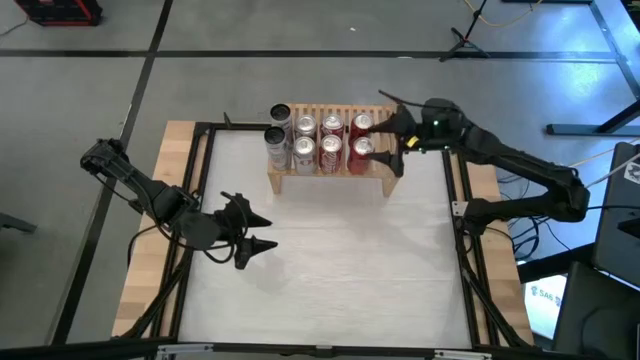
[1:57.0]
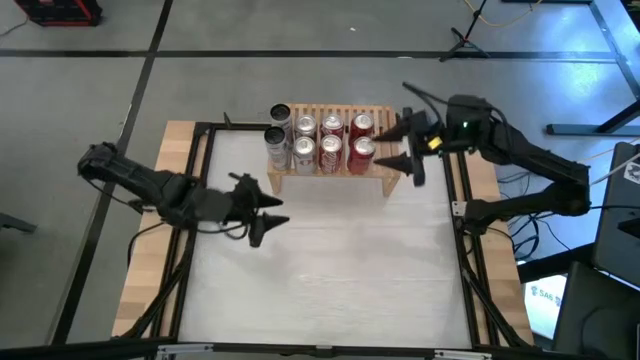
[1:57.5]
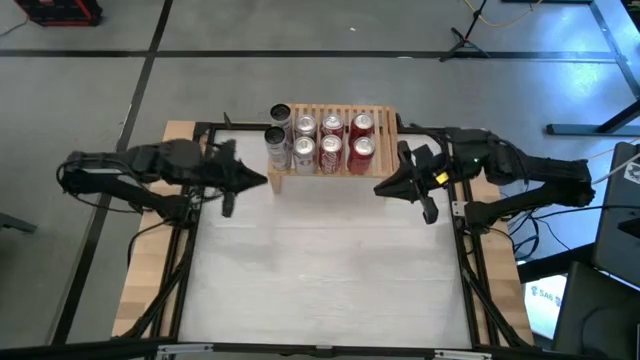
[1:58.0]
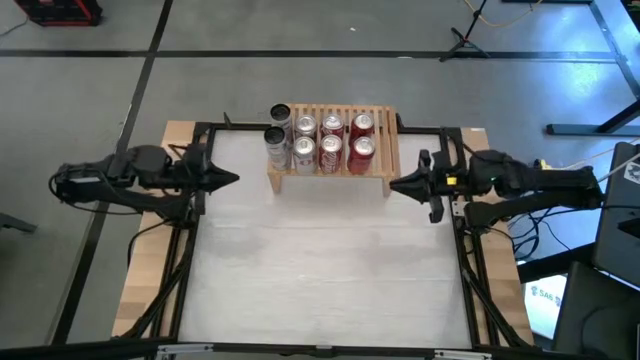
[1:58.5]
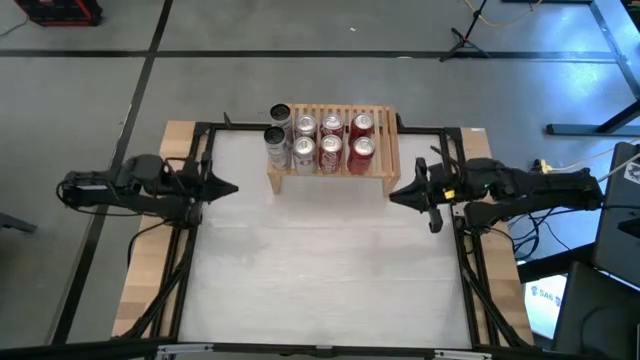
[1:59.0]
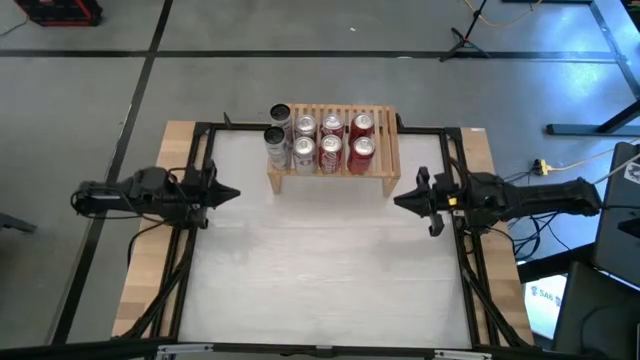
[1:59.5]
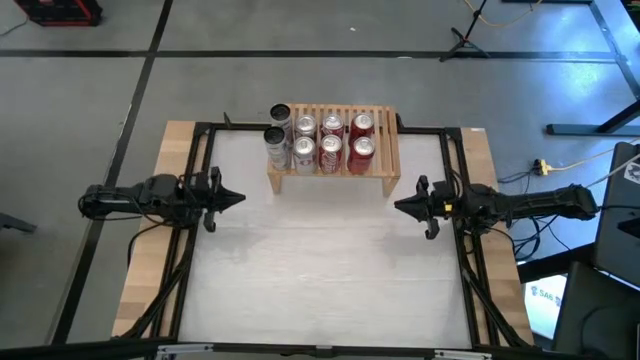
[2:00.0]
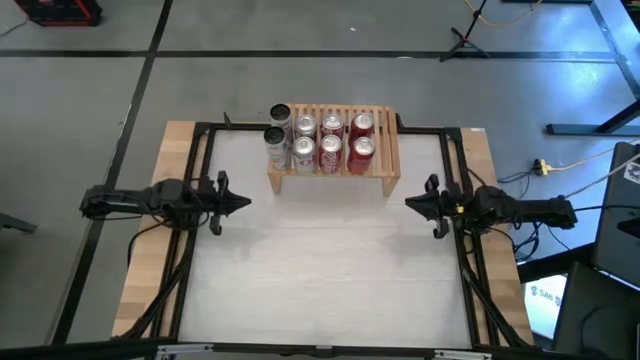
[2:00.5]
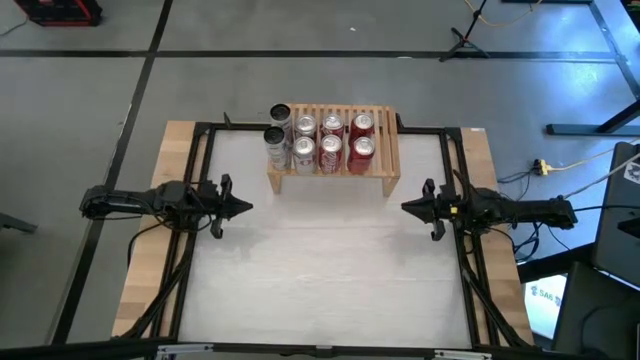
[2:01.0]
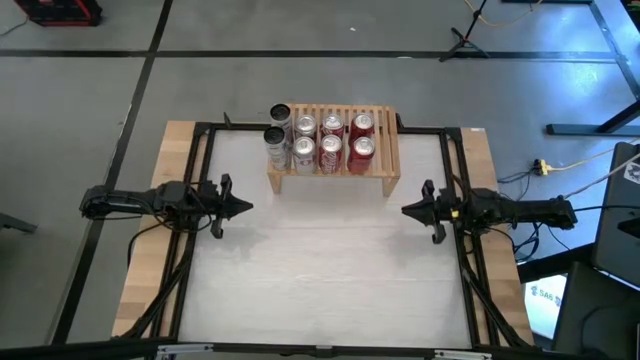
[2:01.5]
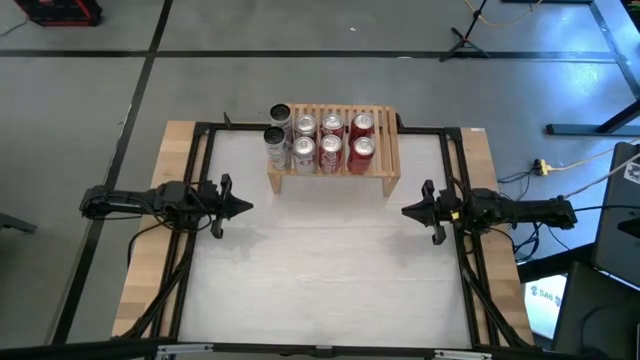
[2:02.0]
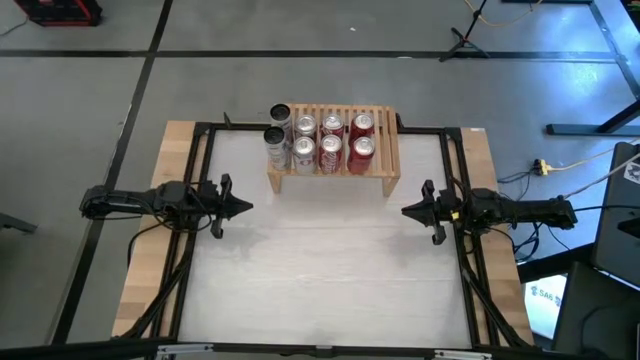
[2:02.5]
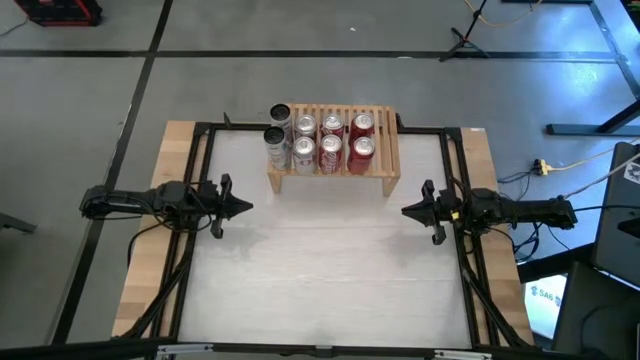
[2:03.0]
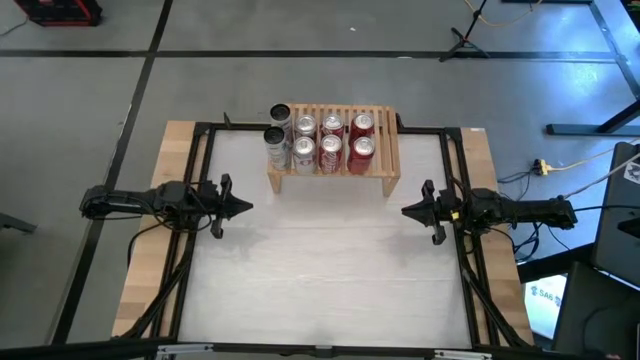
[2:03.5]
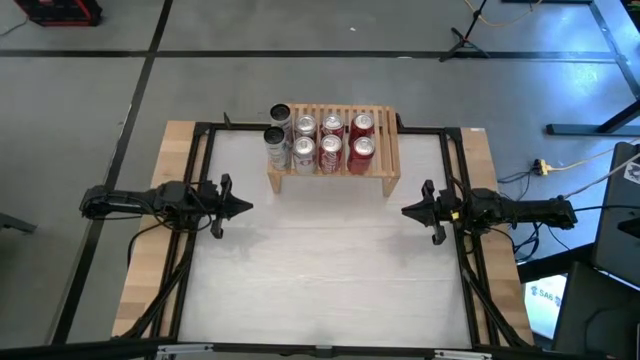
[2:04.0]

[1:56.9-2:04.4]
Task: Place canned beverage on shelf
Return to Home Position

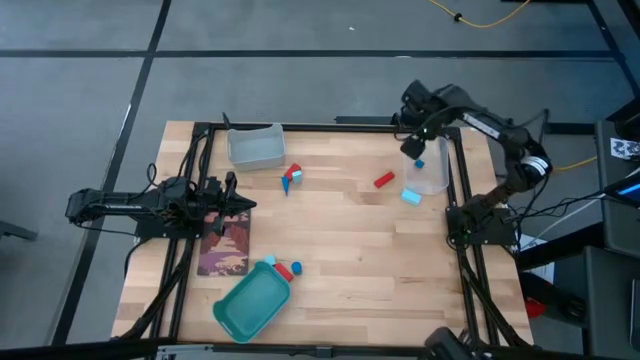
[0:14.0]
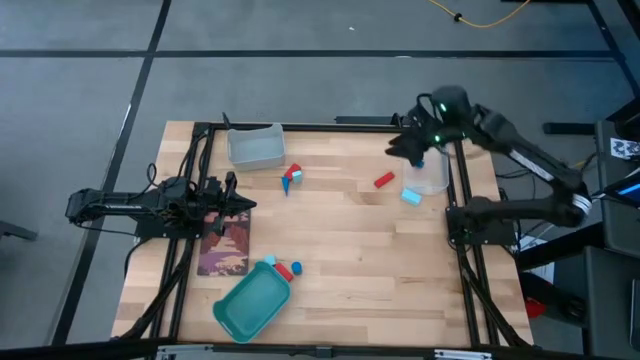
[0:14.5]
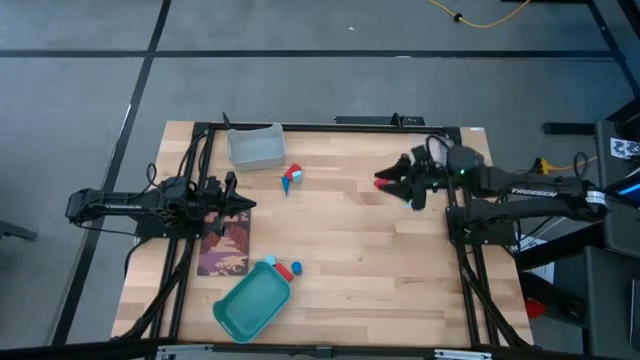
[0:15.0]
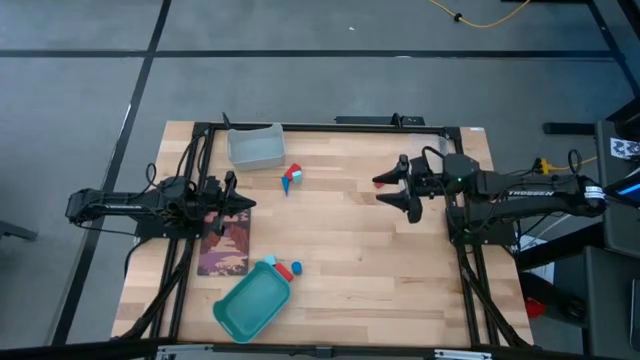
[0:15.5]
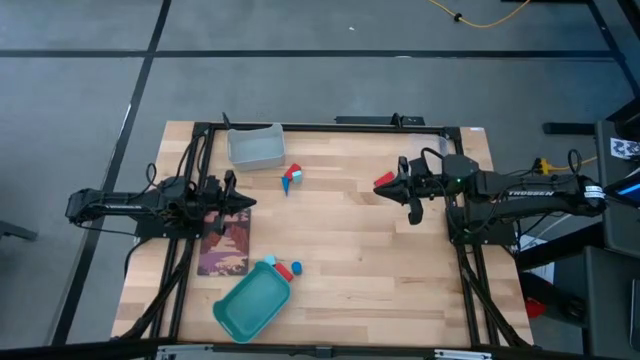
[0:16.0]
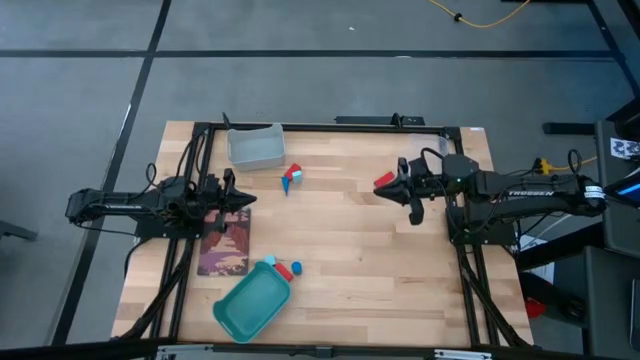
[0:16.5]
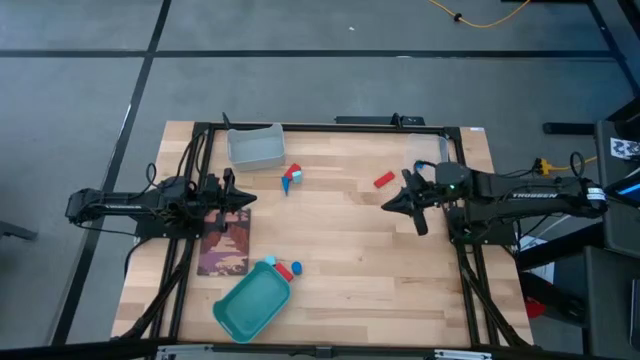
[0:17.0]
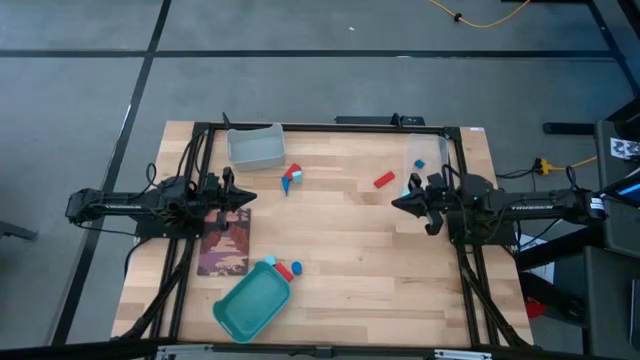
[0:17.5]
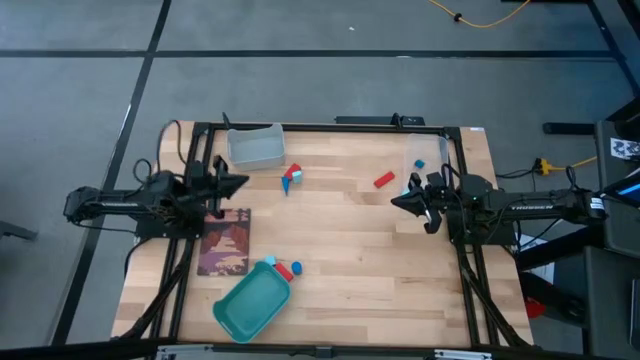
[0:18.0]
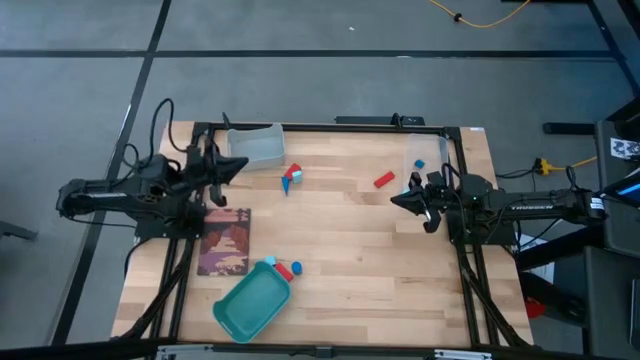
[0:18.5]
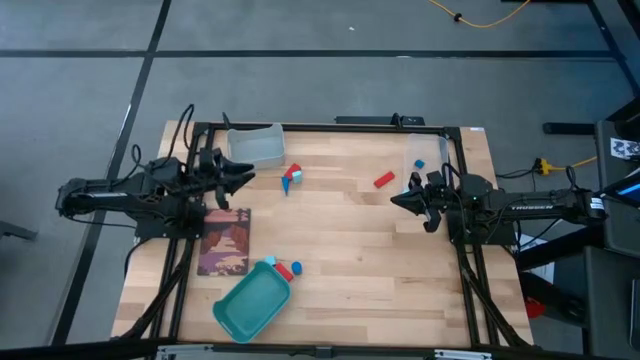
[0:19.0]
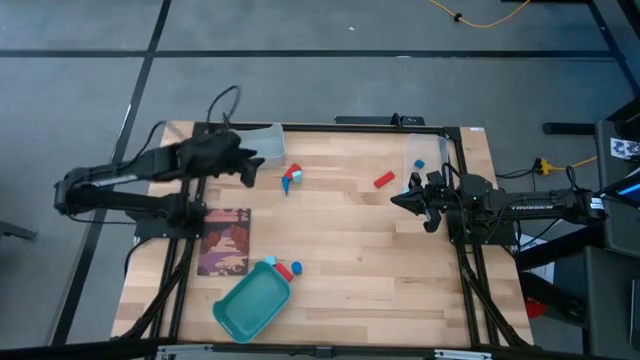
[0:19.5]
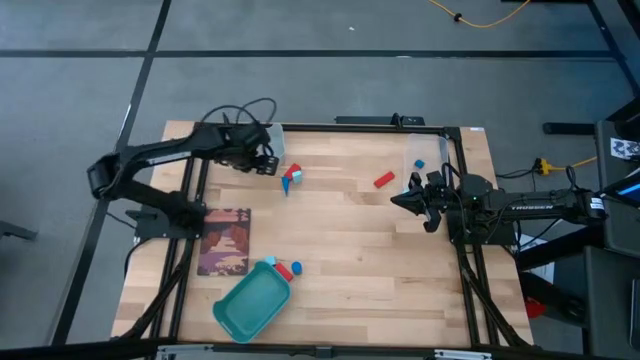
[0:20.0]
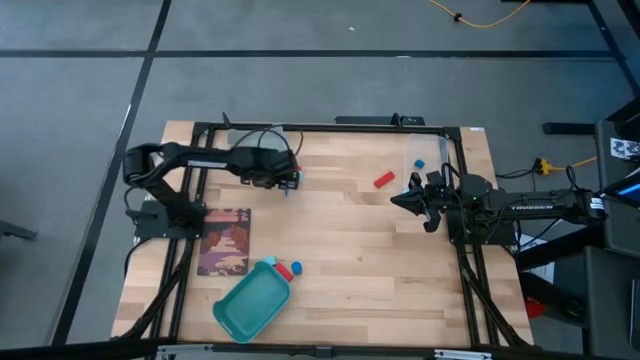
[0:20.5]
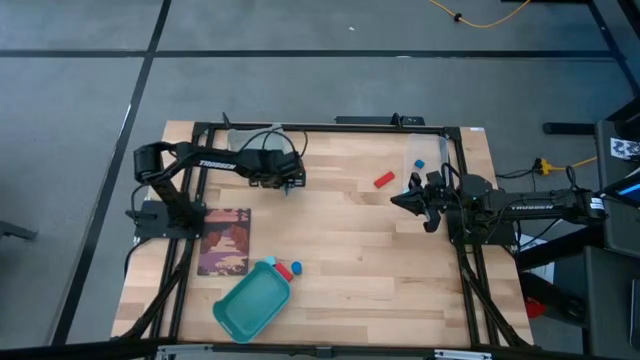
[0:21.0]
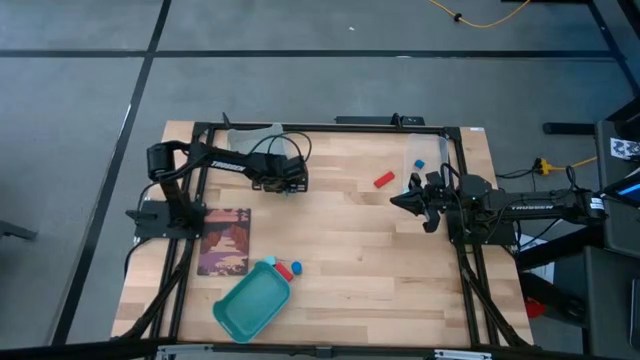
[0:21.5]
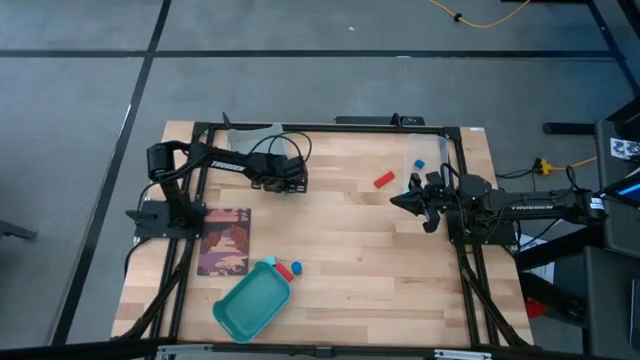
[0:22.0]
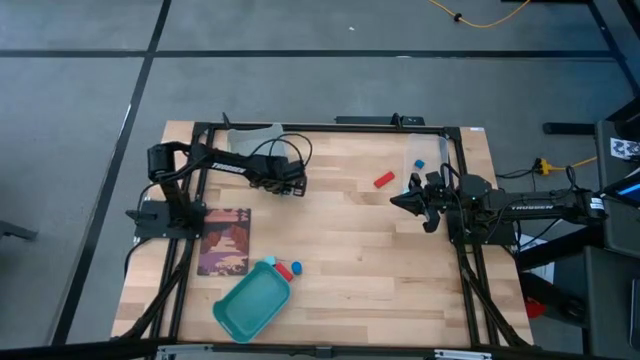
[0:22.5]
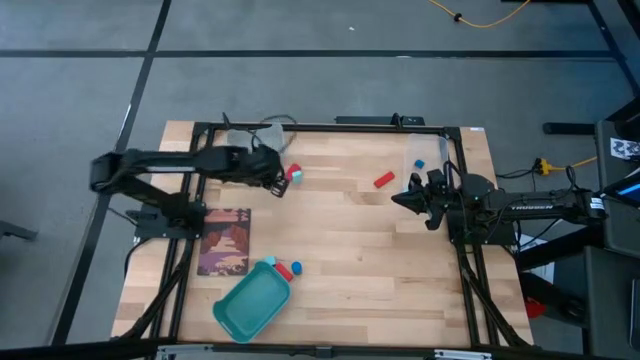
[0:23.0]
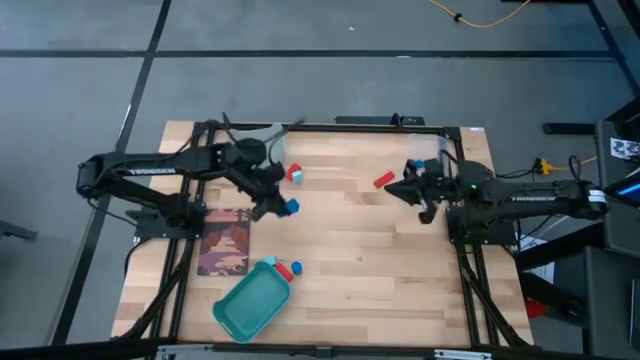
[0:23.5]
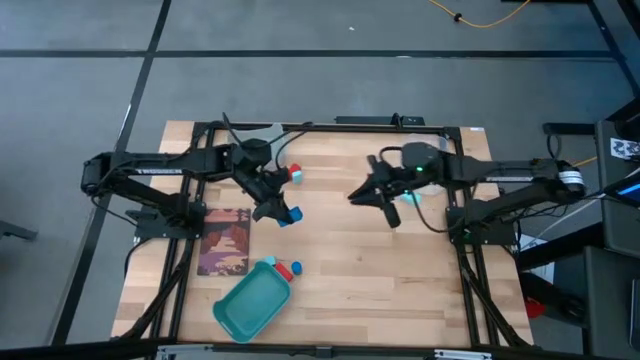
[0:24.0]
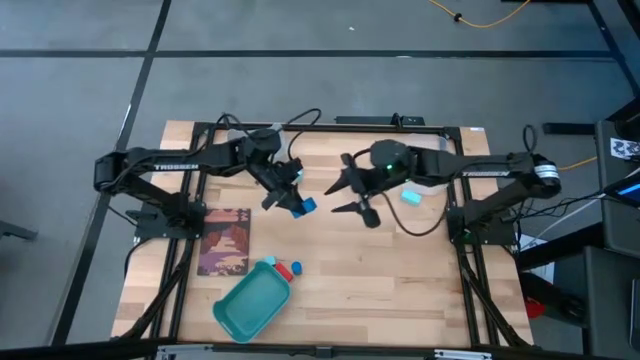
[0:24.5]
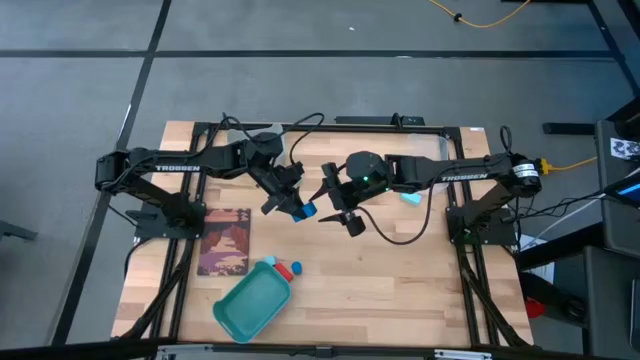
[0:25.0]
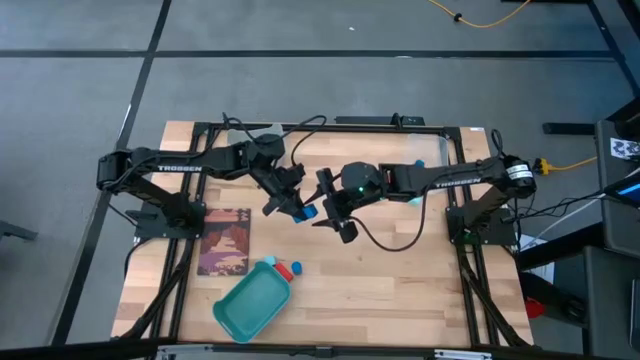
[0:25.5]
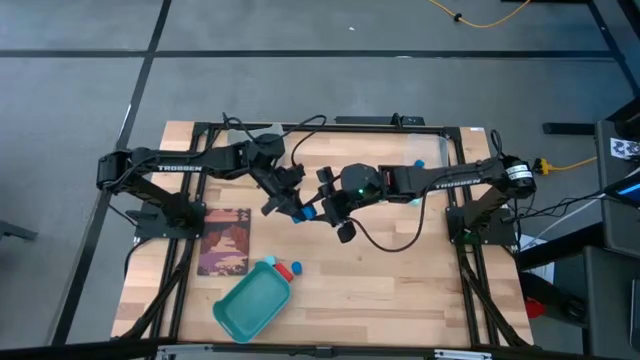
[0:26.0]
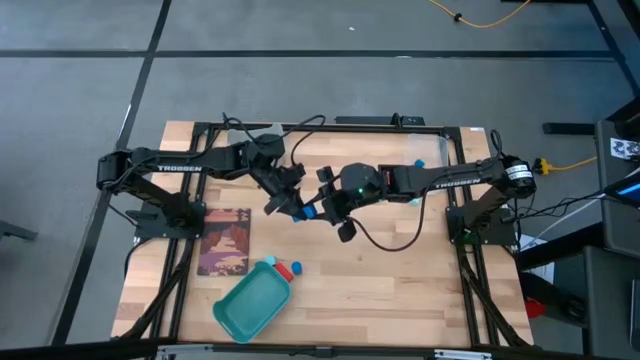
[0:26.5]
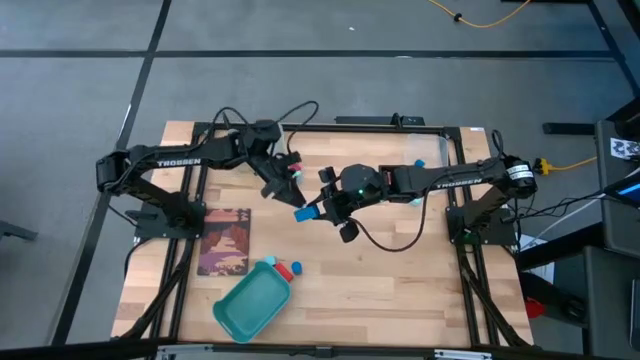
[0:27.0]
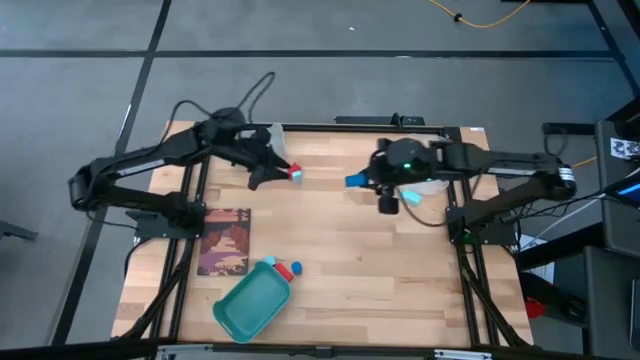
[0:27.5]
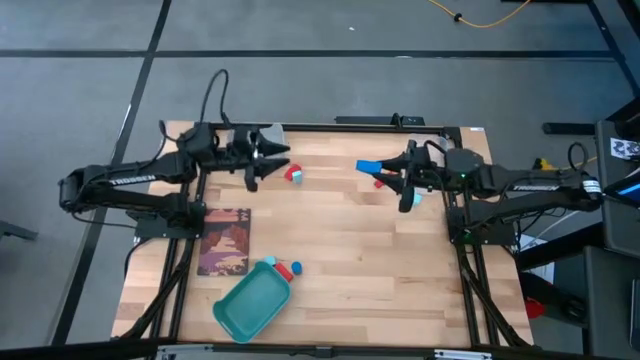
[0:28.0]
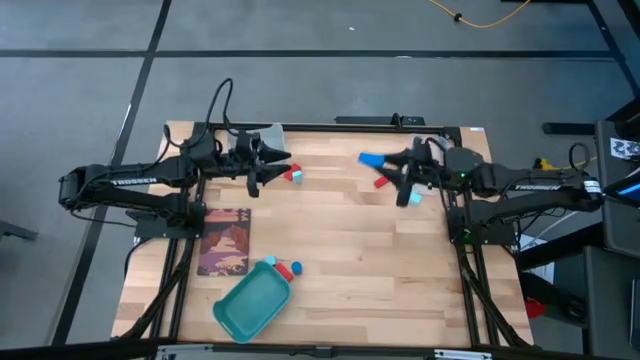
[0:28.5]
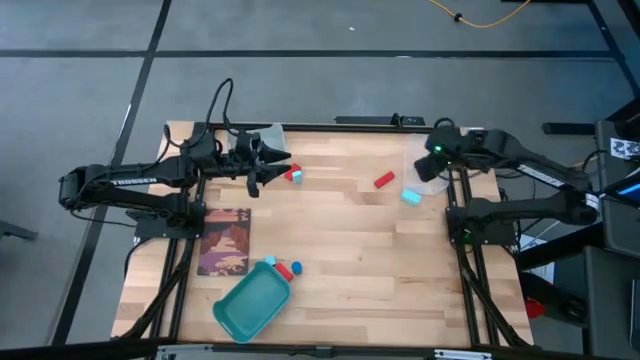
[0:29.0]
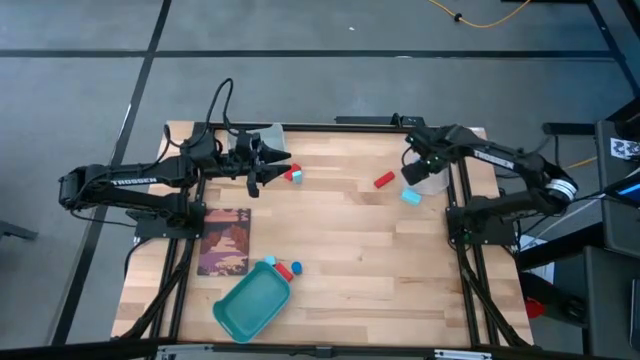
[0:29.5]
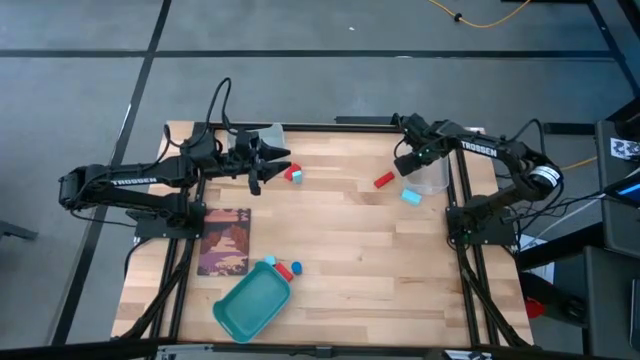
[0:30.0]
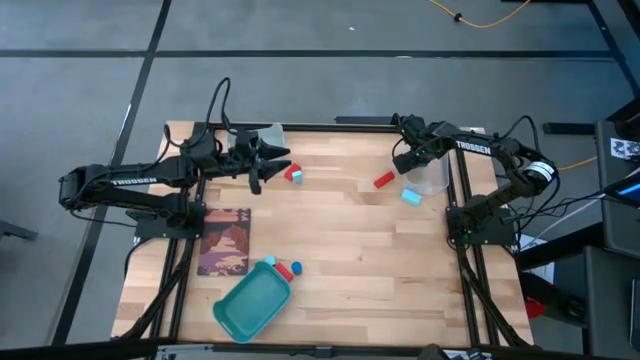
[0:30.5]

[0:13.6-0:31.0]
Task: Sort & place blocks by color
Put the top blue block into the transparent bin
